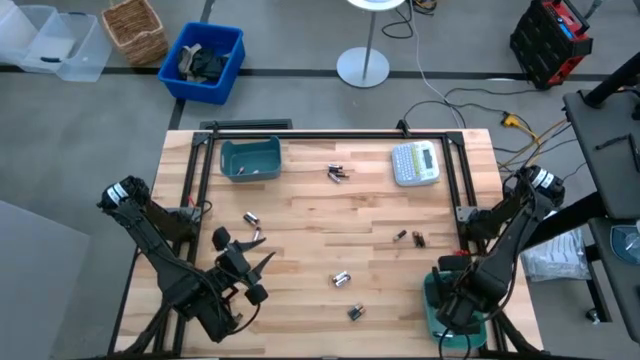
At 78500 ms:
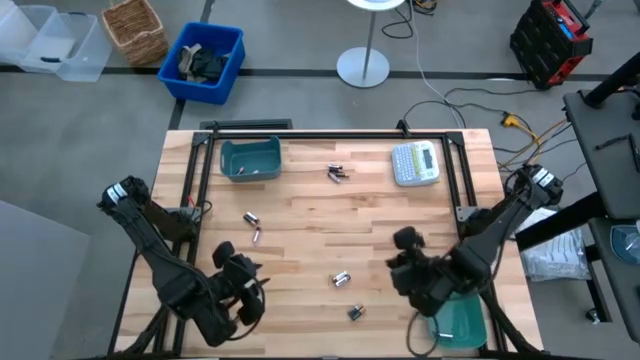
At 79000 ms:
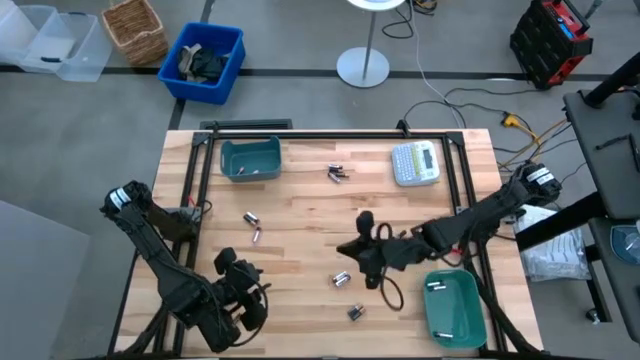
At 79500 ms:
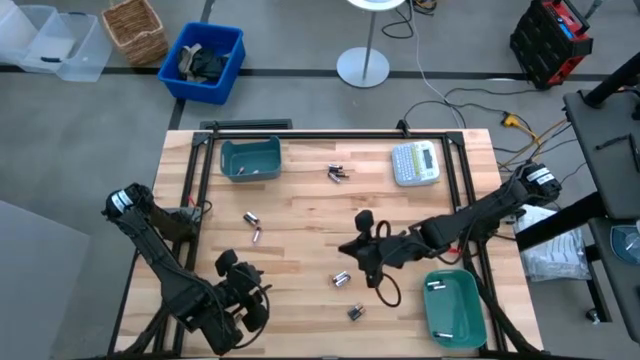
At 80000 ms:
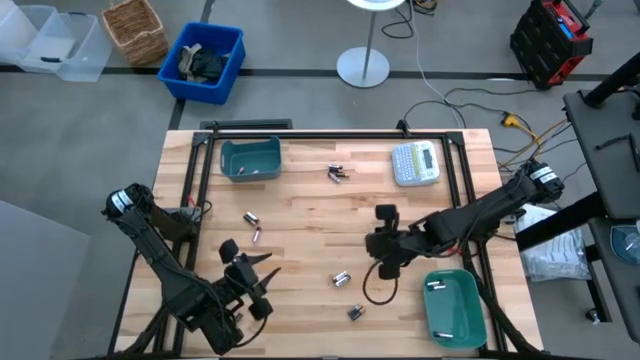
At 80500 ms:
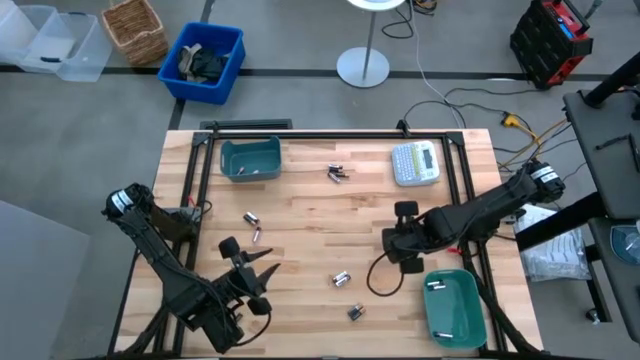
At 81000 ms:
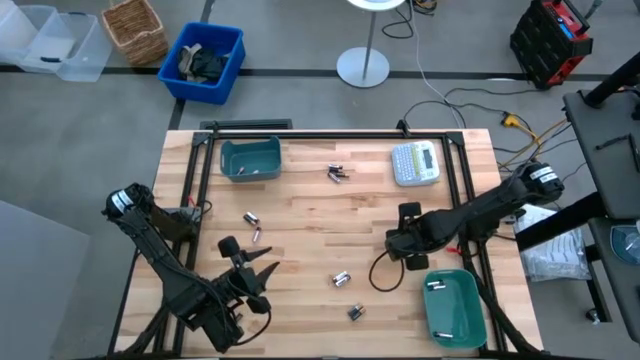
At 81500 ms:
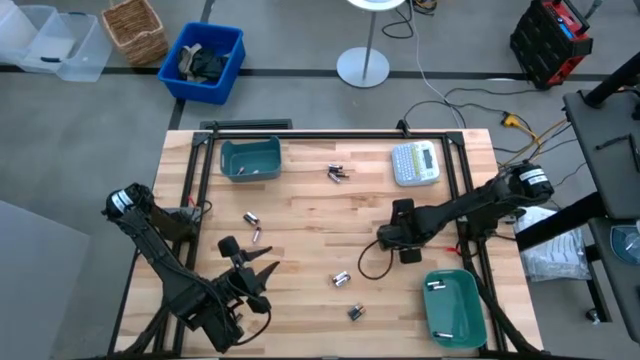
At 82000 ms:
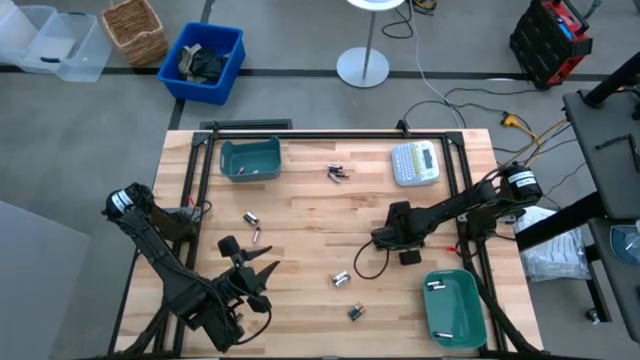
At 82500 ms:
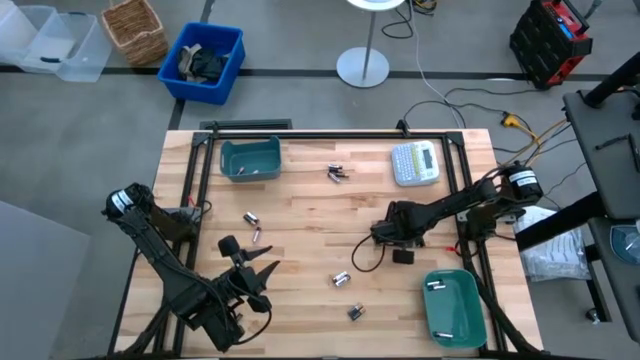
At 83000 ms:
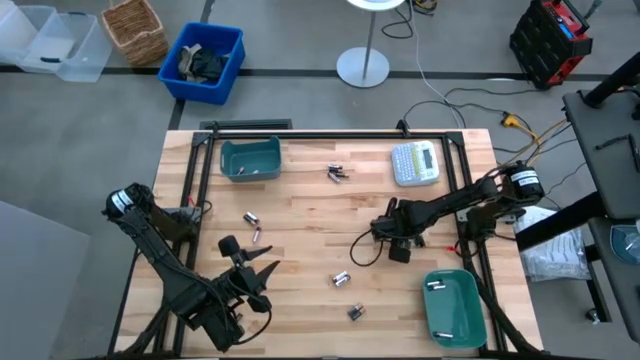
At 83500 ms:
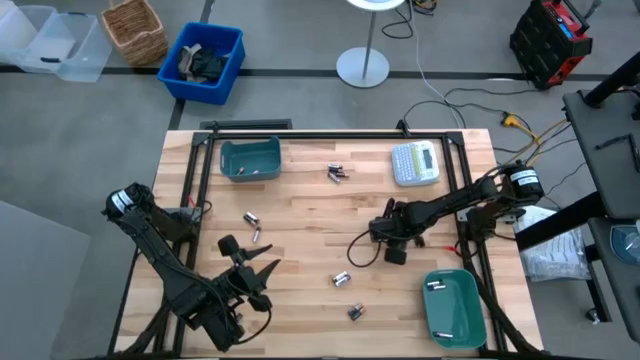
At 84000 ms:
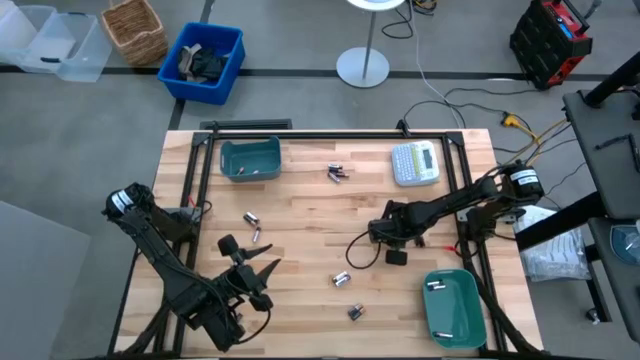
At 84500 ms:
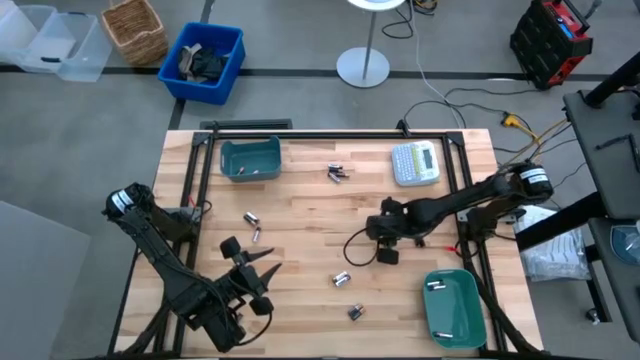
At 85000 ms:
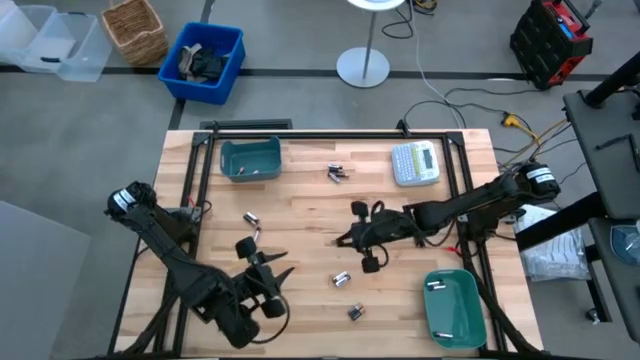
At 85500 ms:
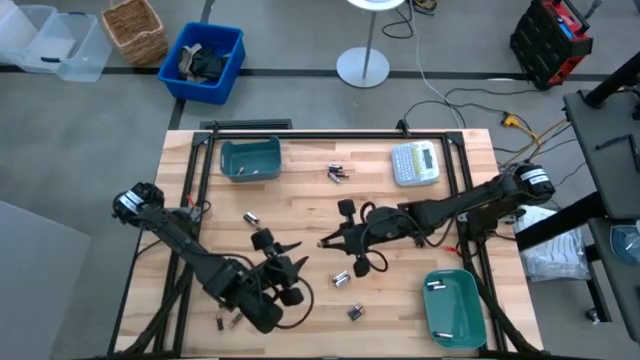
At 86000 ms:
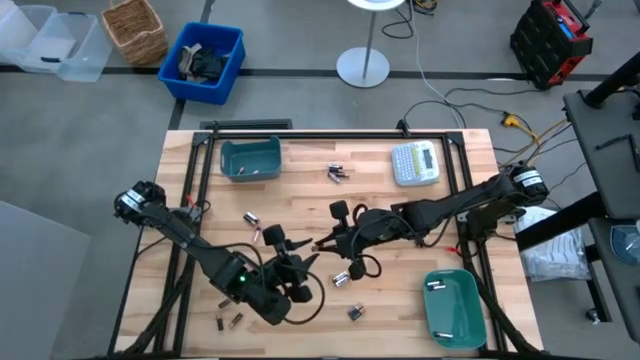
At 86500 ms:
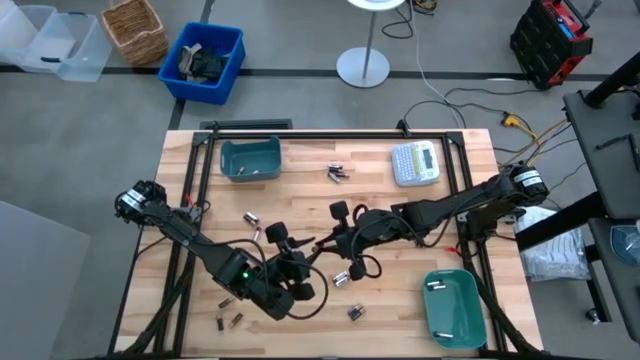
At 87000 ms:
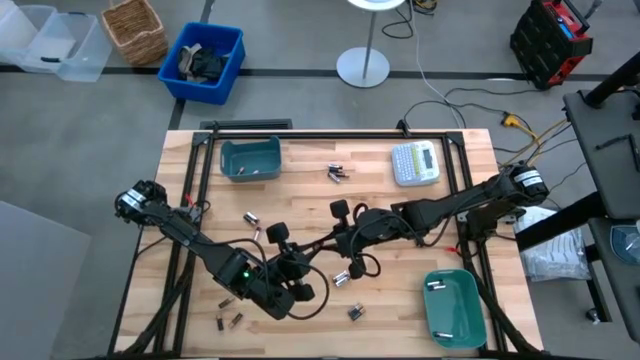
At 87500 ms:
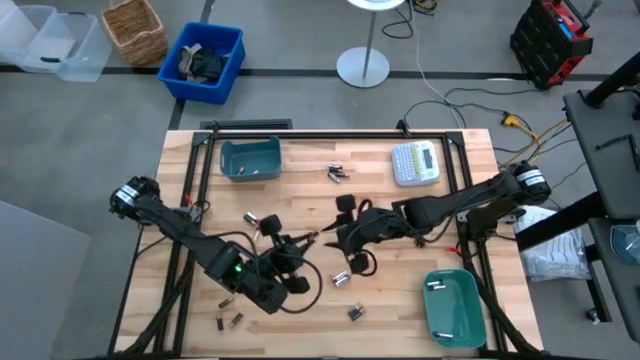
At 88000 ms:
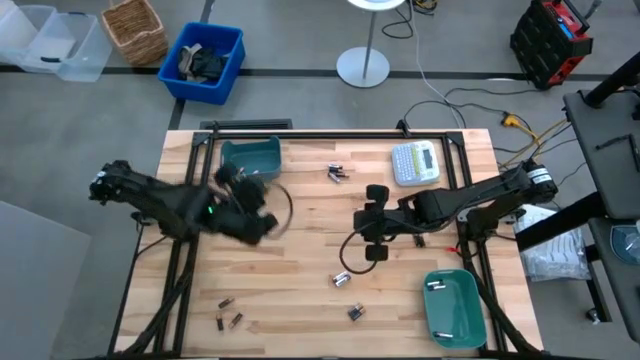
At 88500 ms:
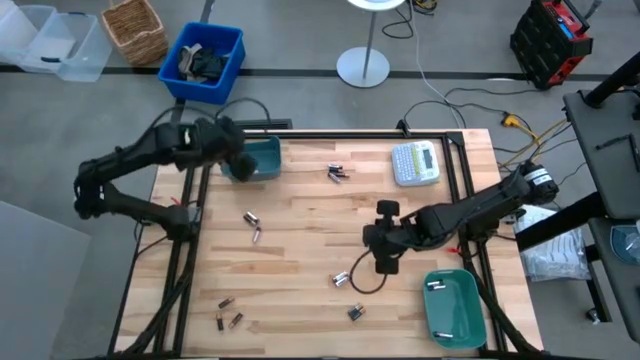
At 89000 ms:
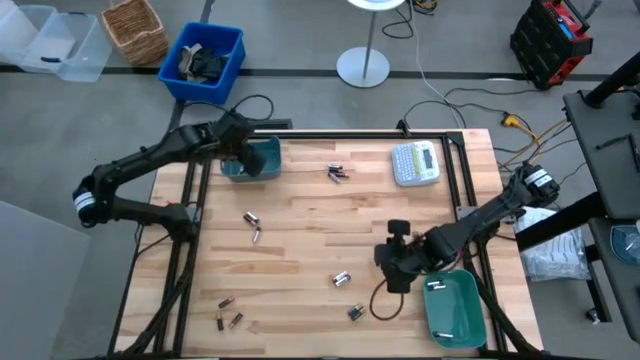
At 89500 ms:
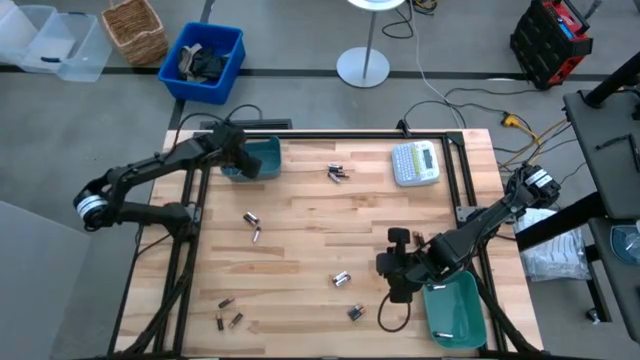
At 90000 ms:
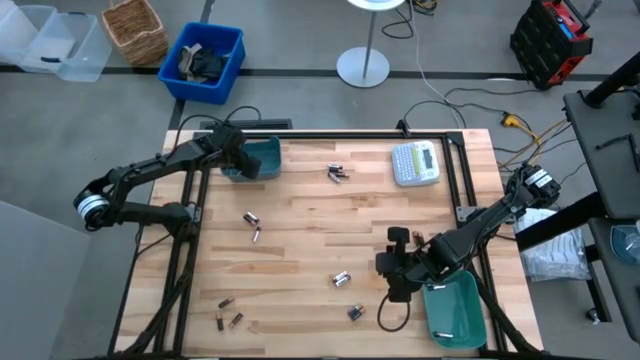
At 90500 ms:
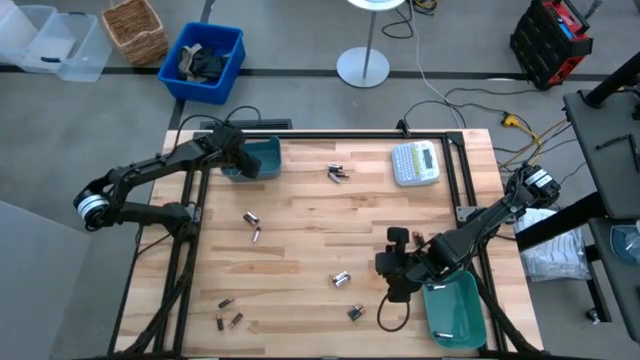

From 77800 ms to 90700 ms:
Task: Sort batteries
Put the black battery into the blue bin

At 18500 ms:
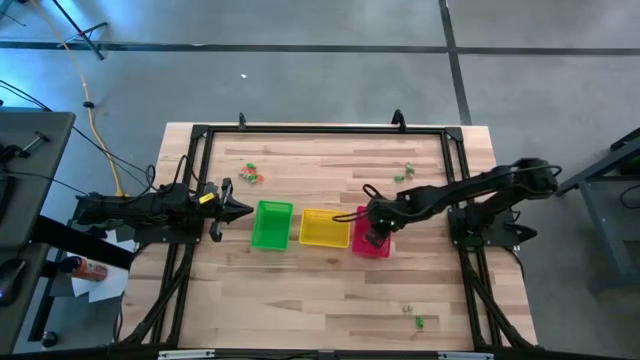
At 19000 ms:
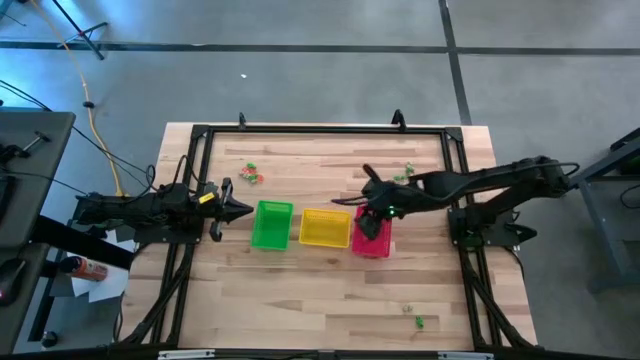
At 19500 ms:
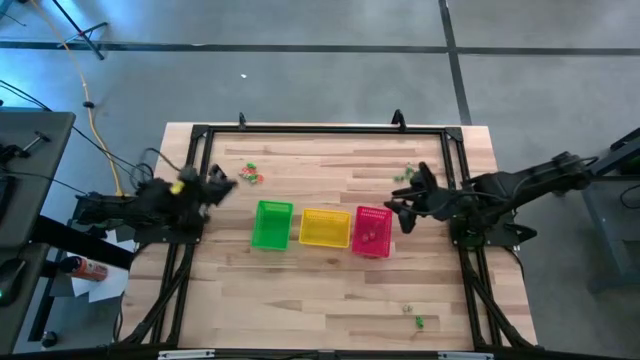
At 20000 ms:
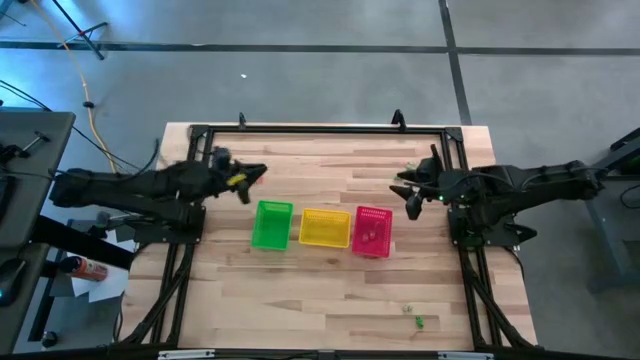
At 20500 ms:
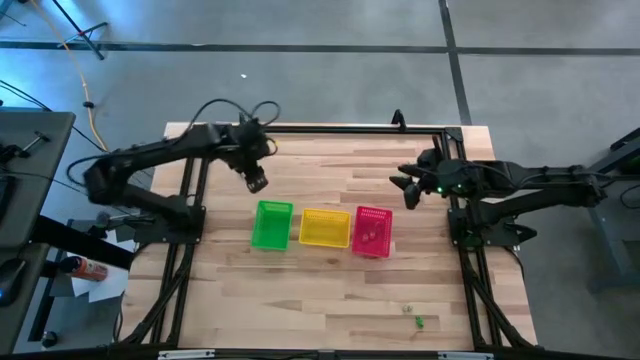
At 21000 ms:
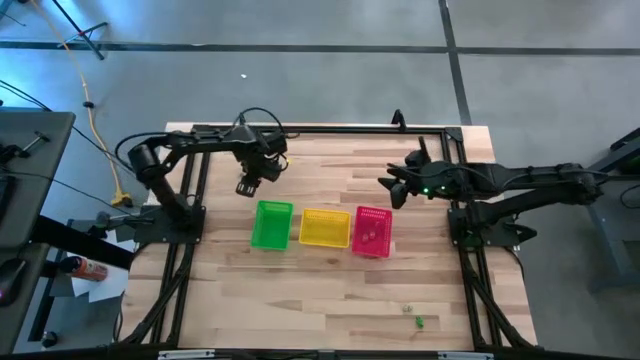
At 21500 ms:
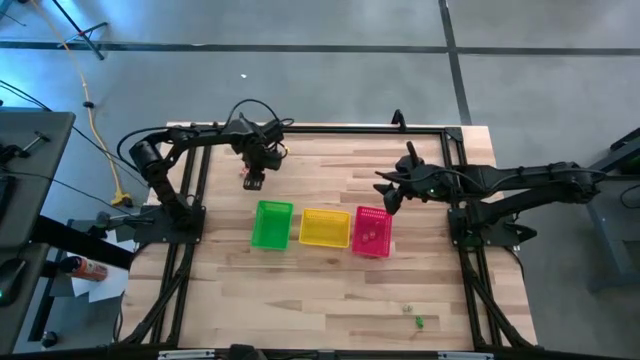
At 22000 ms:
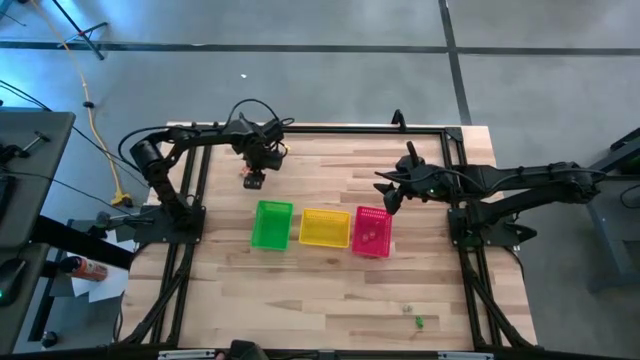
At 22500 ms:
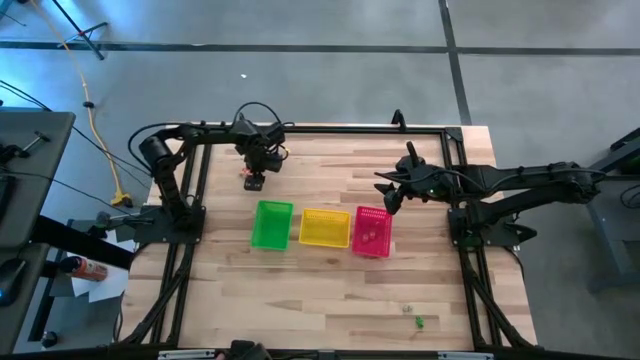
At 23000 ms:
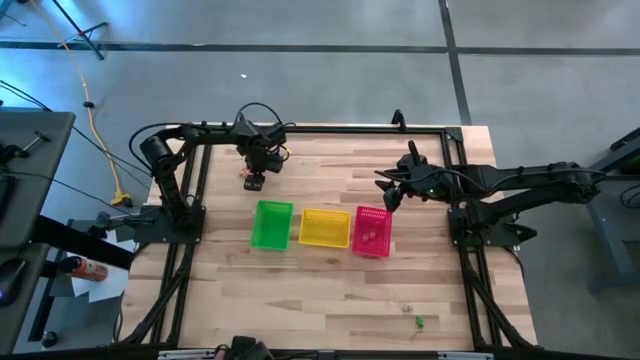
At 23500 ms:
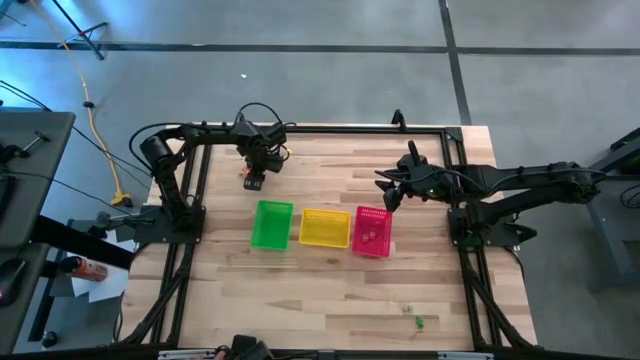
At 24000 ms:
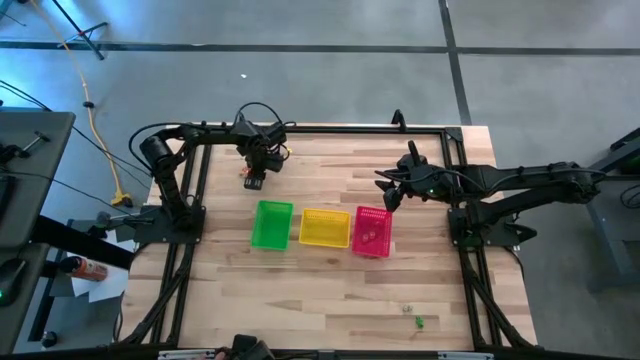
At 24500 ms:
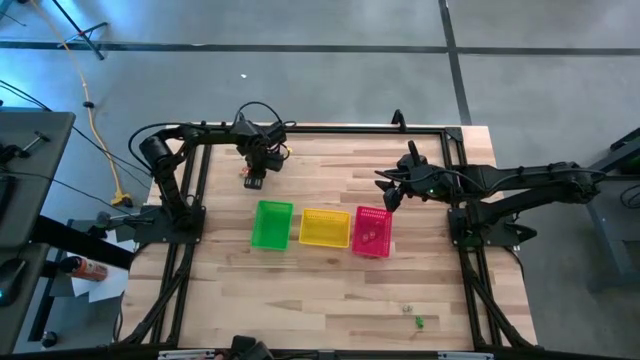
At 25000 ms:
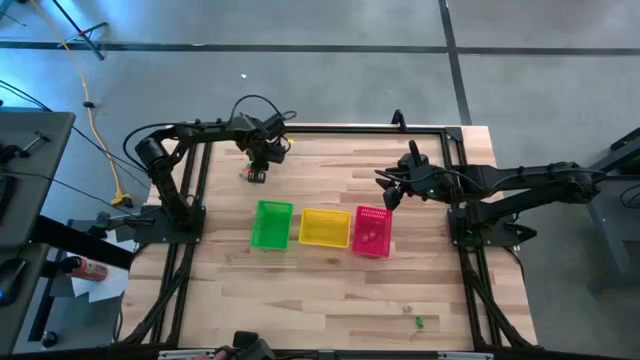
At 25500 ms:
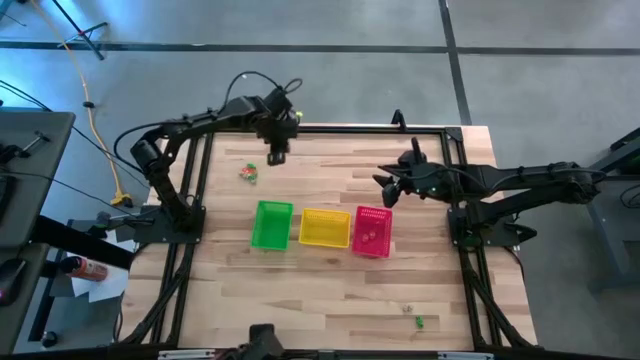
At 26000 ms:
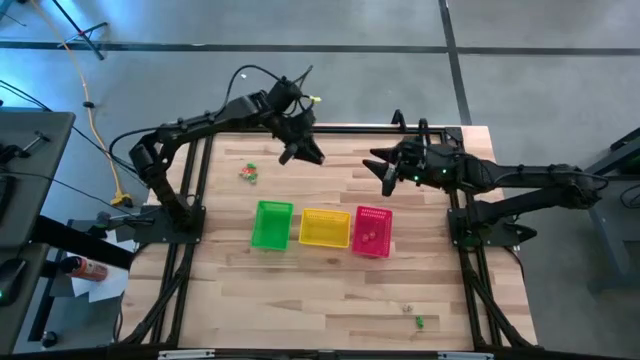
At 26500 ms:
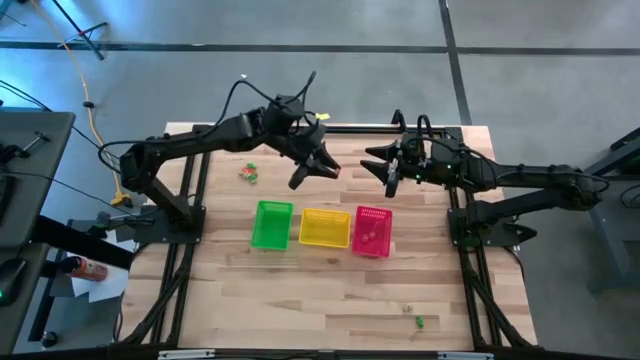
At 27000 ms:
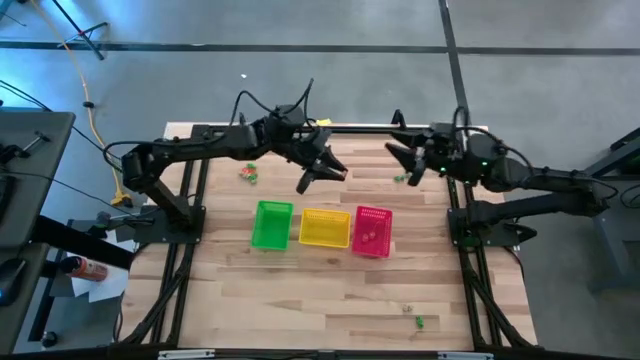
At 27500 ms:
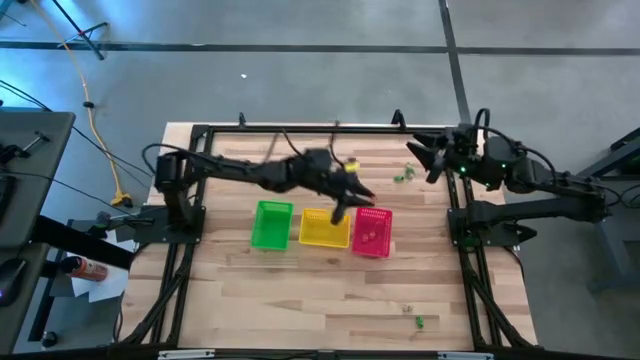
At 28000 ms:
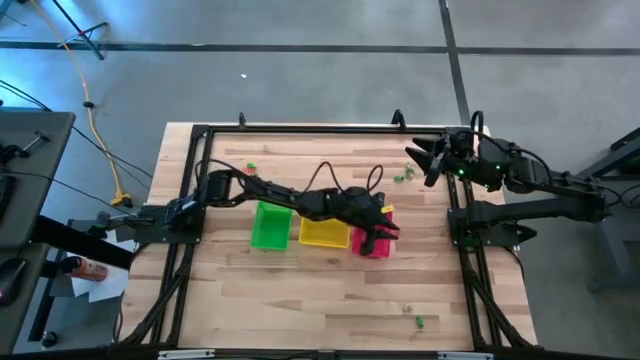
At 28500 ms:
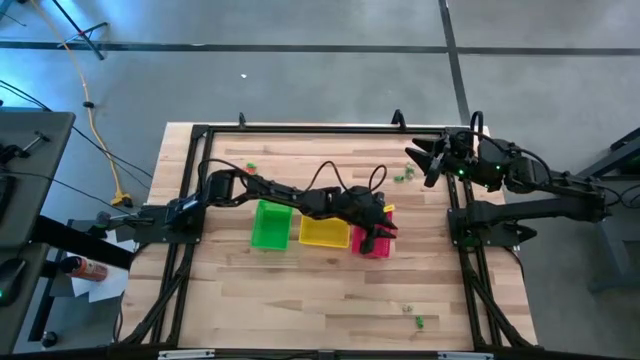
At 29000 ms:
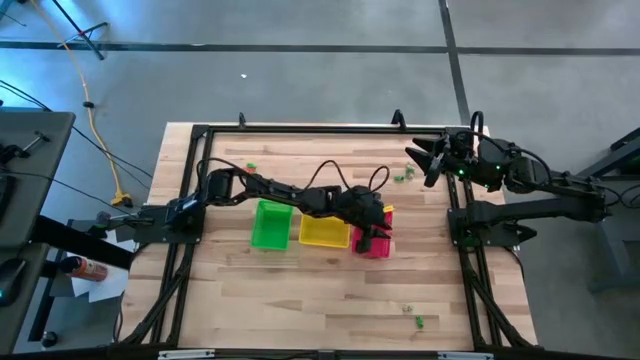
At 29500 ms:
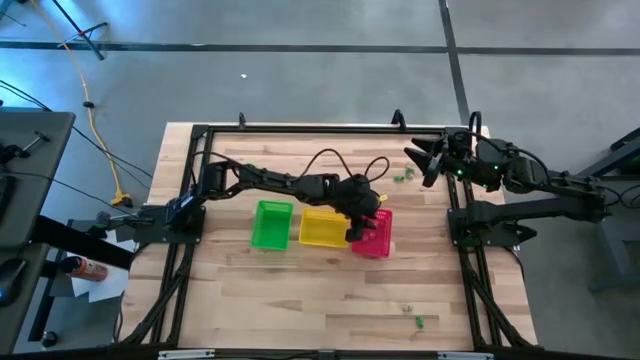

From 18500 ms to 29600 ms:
Task: Sort Halloween decoration
Put the orange pumpkin toy into the red basket
